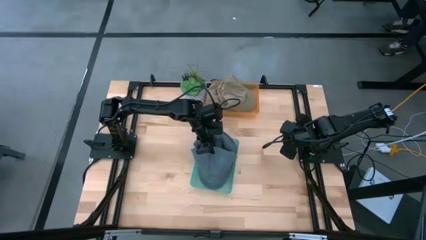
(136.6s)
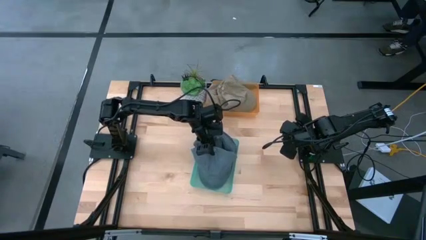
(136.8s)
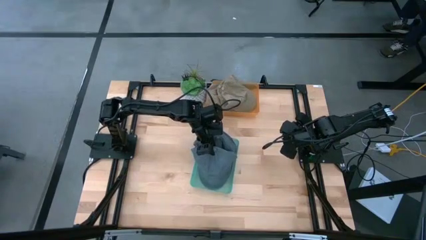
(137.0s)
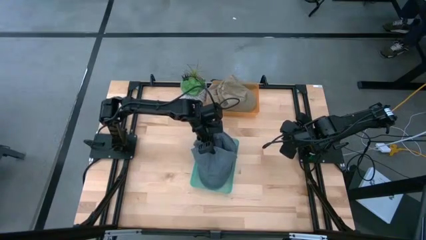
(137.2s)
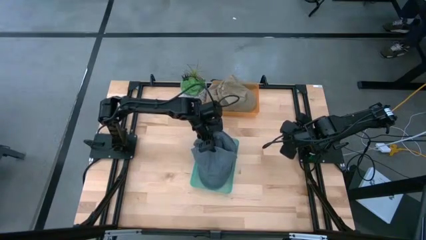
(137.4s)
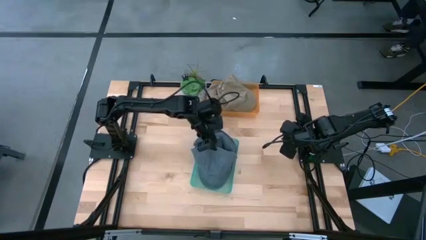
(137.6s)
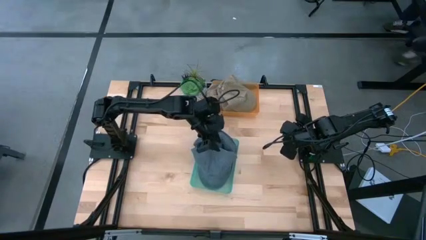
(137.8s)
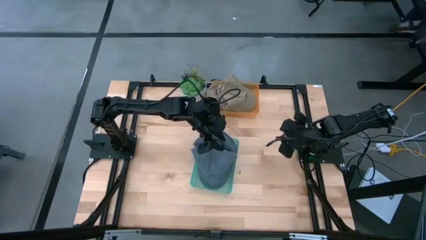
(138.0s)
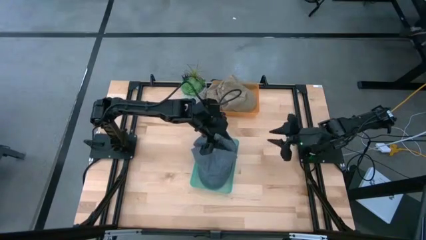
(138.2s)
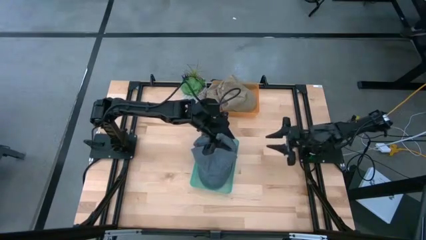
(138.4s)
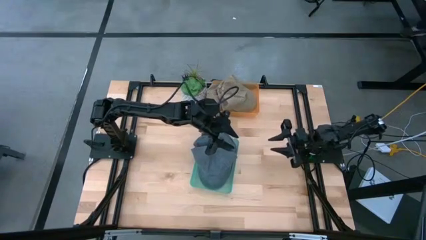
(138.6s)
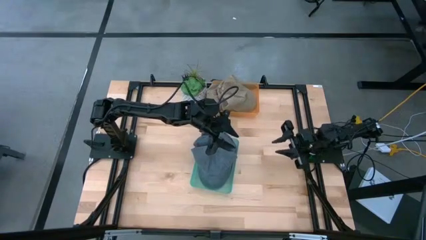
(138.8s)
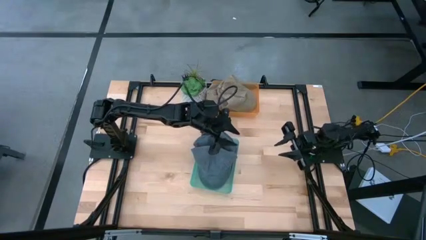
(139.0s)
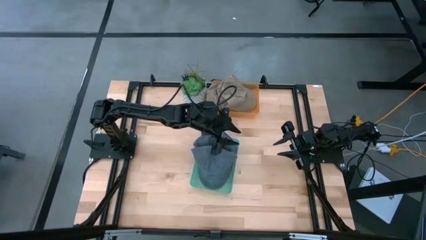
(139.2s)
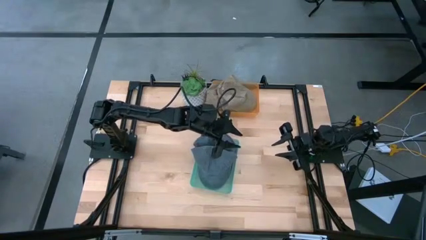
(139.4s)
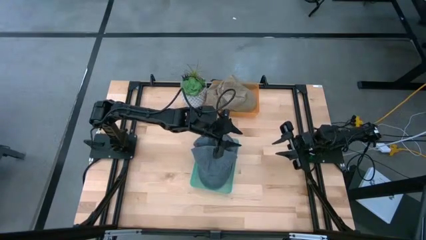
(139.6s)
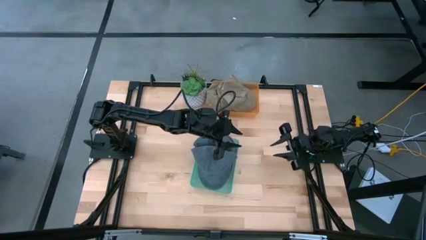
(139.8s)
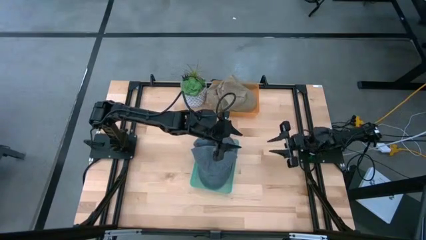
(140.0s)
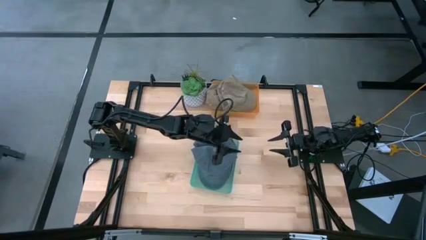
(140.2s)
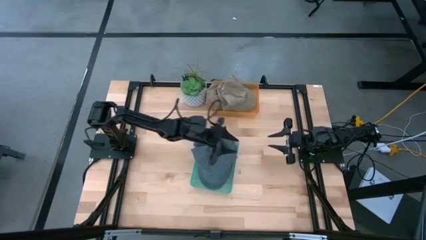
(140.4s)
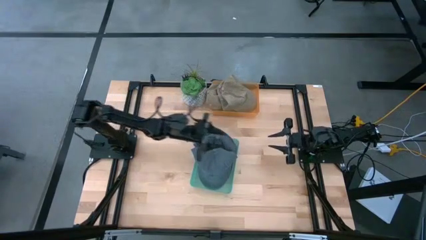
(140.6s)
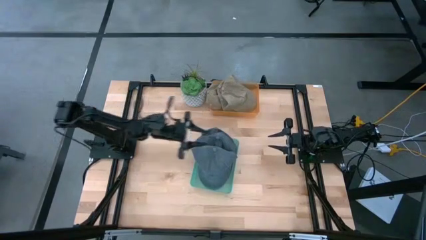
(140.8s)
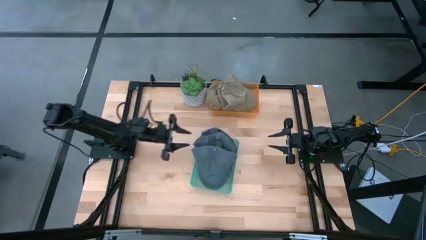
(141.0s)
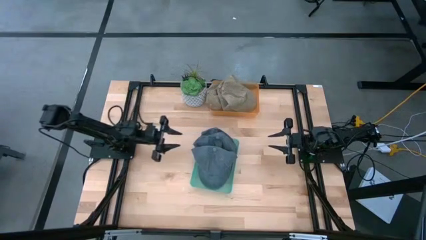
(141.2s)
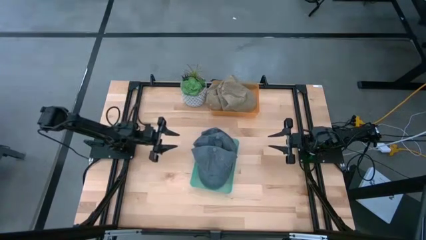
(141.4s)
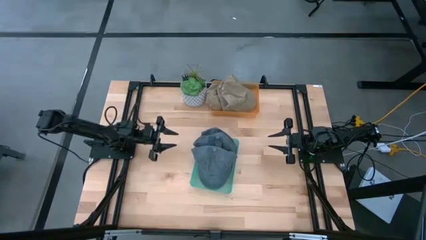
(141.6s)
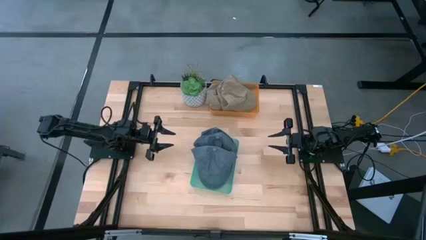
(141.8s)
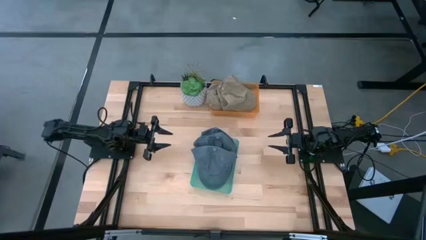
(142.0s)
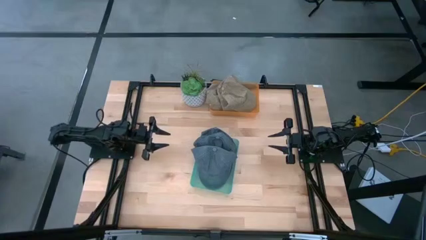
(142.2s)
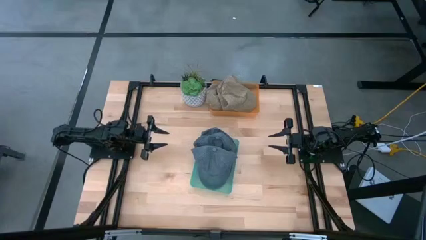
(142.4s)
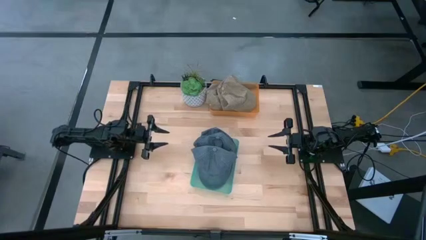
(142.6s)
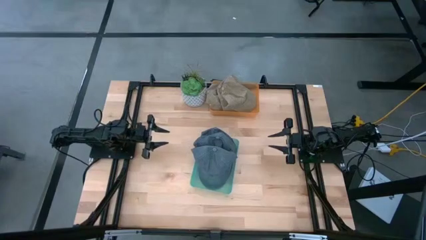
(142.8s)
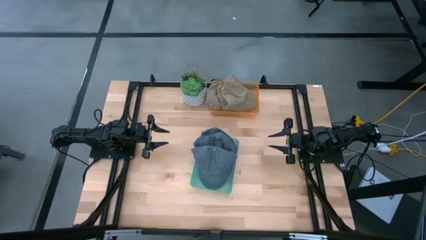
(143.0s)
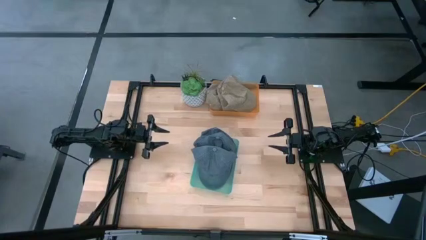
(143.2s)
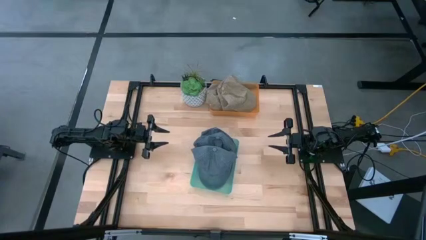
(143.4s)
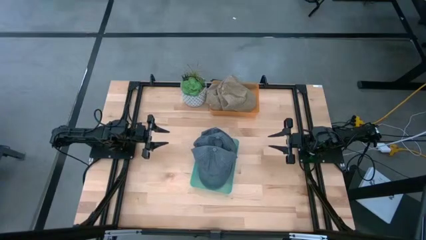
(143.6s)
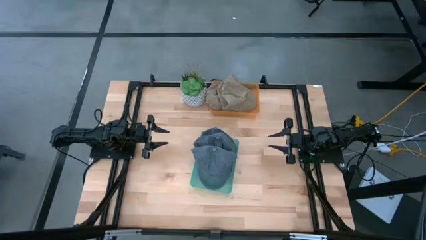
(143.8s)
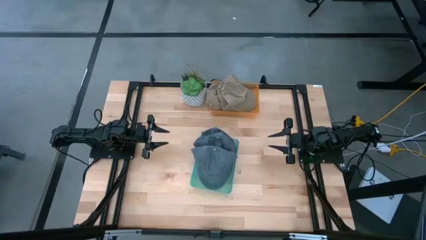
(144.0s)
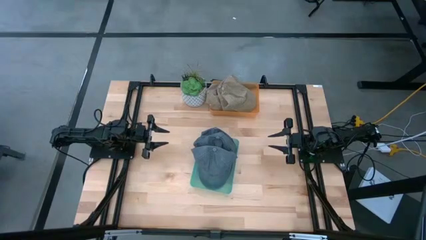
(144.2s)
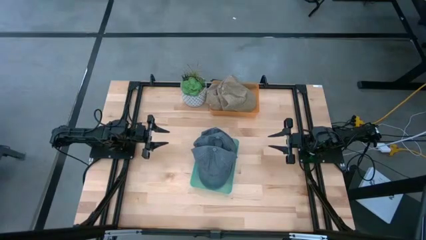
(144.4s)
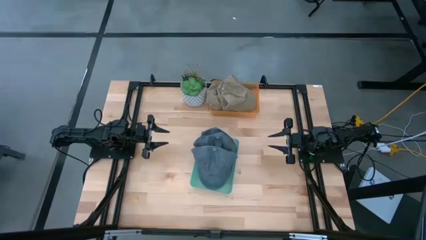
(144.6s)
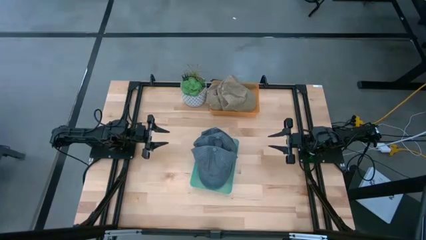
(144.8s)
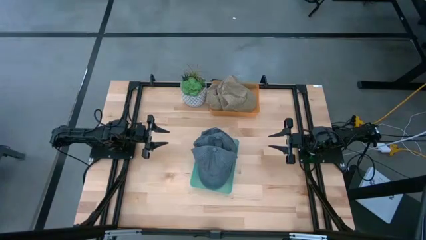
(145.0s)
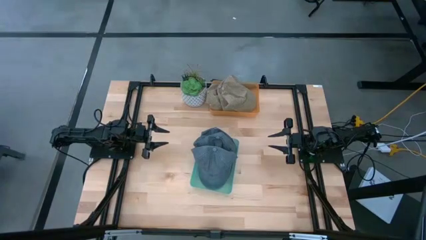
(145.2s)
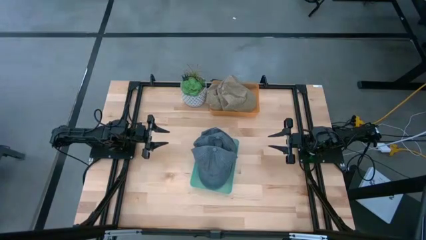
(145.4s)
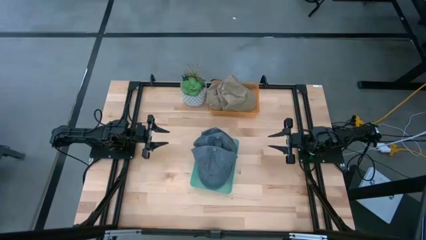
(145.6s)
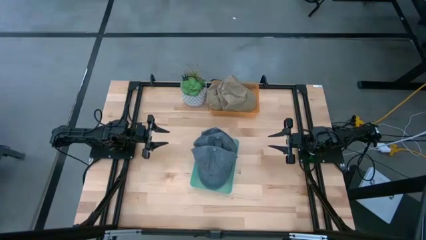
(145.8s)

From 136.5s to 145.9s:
Task: Pick & Place hat
Return to Home Position

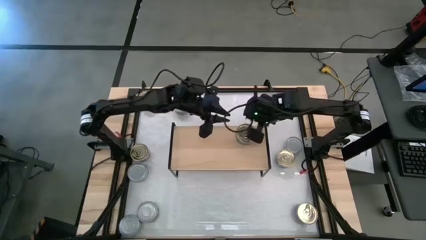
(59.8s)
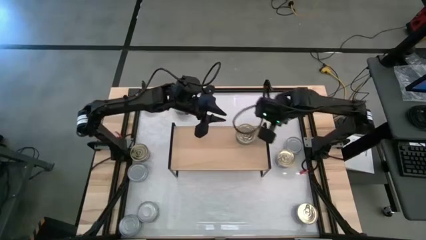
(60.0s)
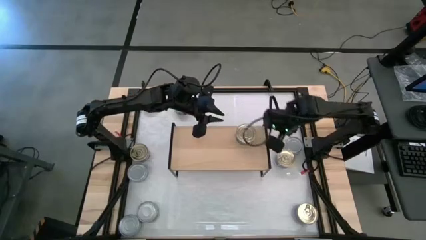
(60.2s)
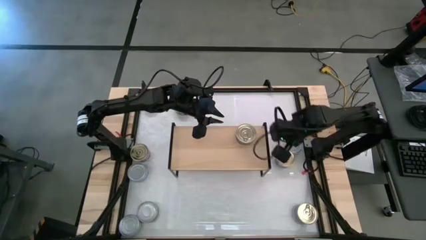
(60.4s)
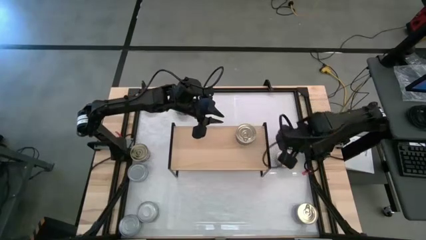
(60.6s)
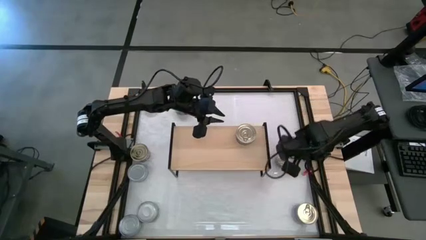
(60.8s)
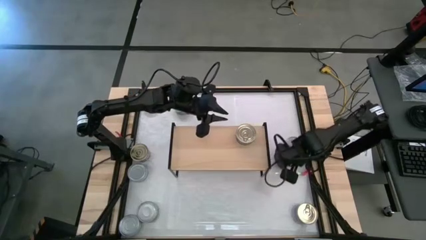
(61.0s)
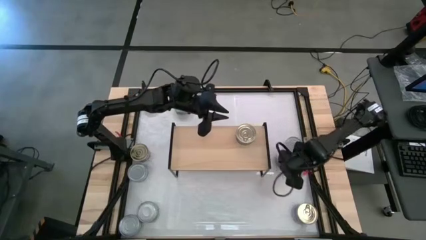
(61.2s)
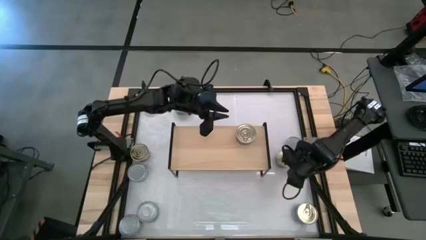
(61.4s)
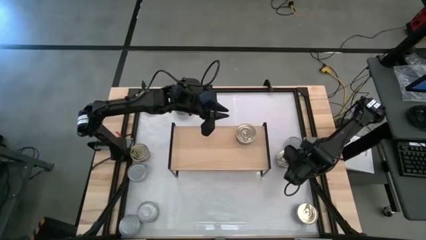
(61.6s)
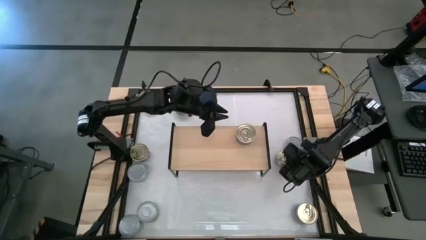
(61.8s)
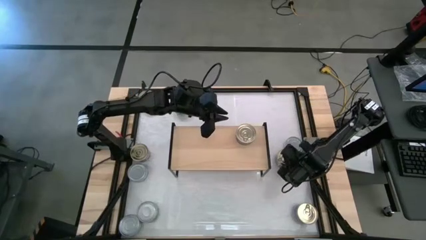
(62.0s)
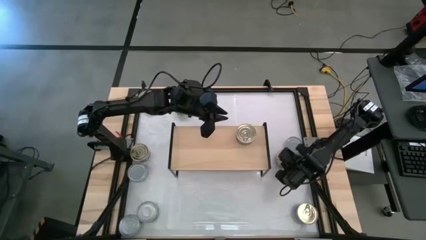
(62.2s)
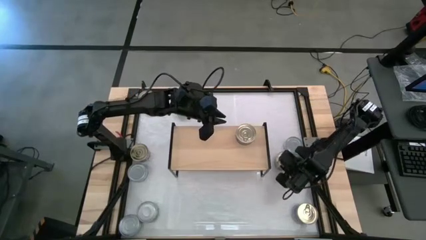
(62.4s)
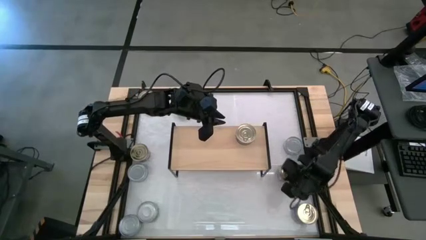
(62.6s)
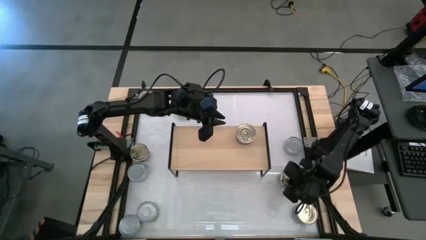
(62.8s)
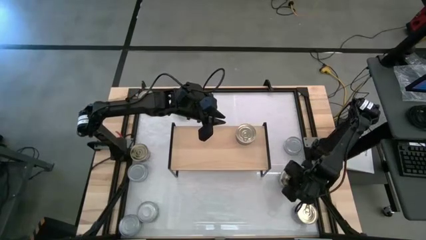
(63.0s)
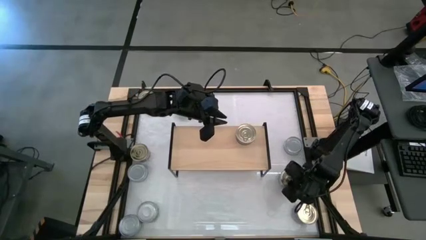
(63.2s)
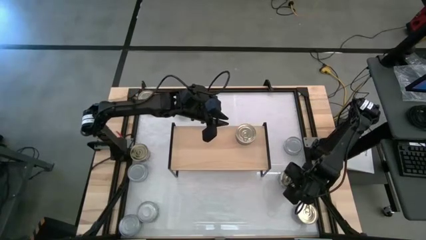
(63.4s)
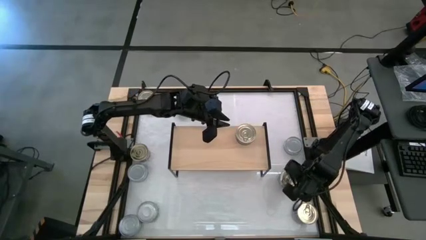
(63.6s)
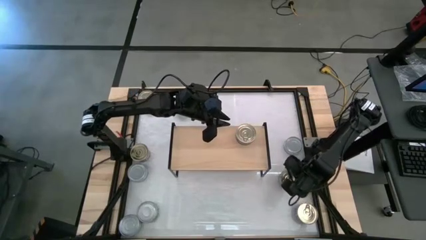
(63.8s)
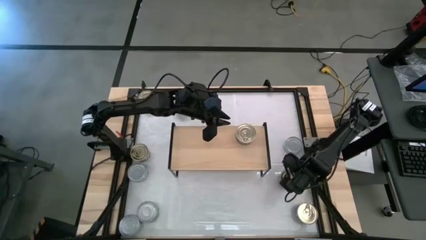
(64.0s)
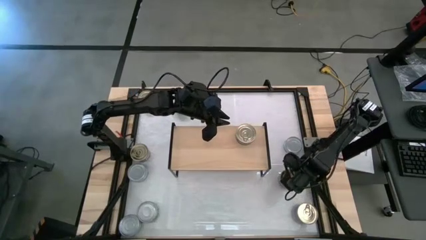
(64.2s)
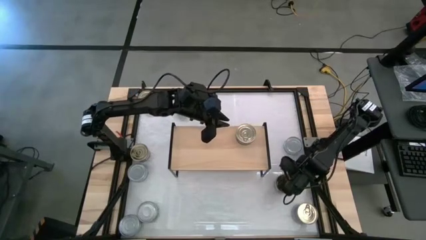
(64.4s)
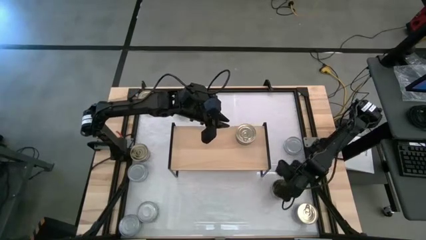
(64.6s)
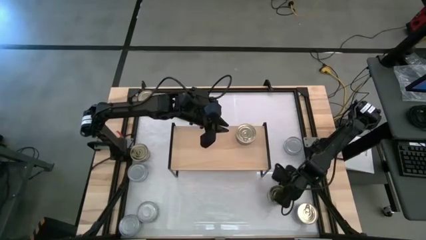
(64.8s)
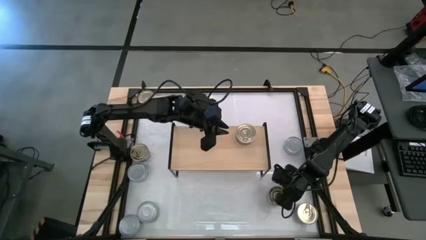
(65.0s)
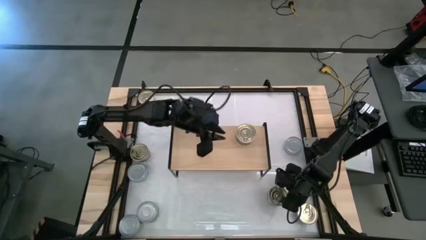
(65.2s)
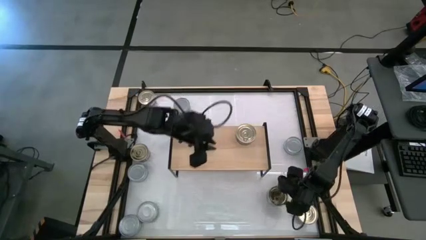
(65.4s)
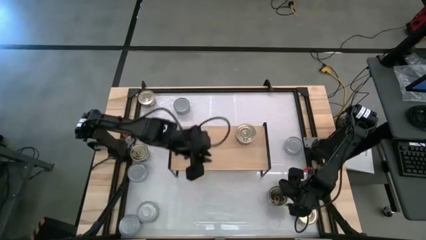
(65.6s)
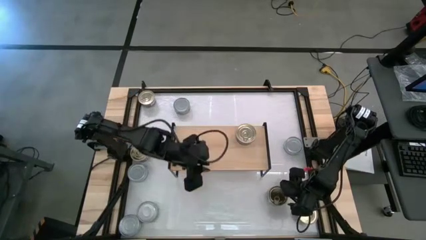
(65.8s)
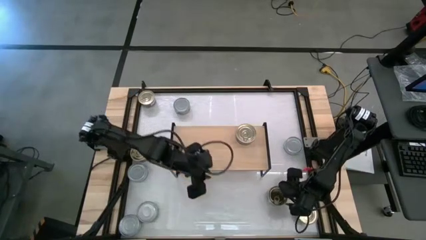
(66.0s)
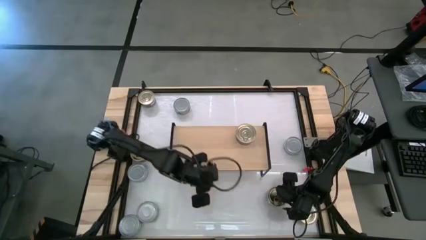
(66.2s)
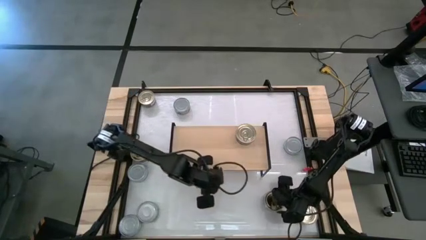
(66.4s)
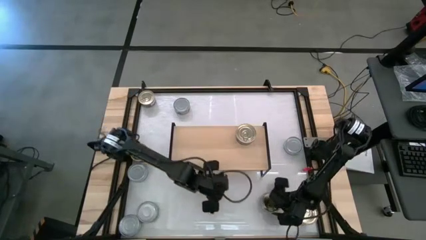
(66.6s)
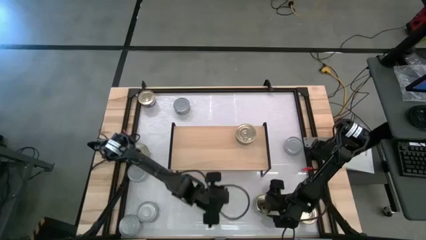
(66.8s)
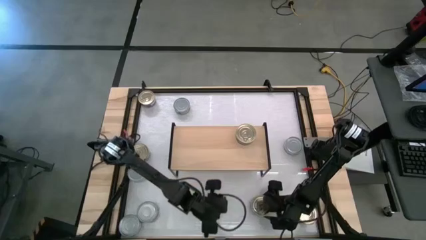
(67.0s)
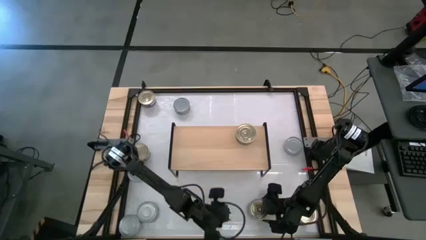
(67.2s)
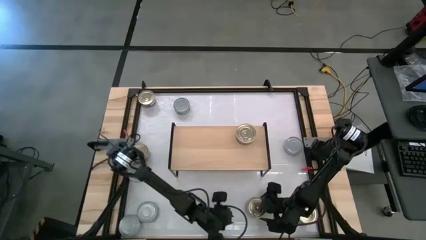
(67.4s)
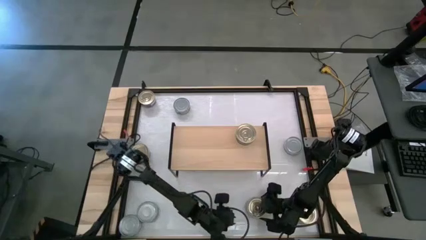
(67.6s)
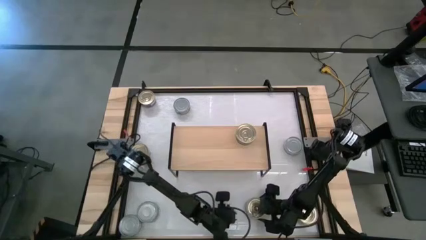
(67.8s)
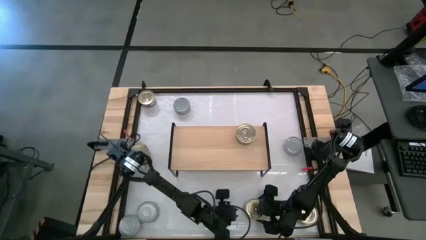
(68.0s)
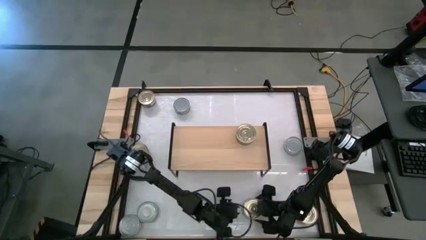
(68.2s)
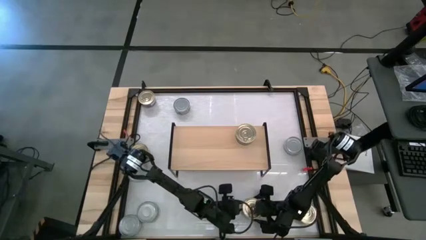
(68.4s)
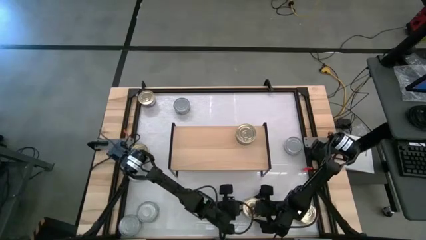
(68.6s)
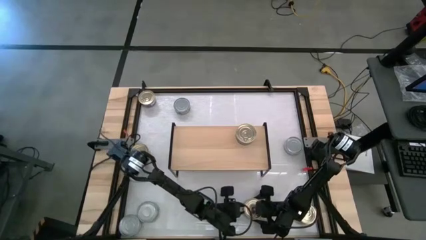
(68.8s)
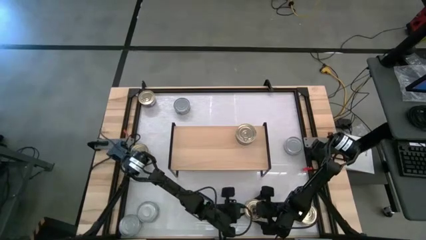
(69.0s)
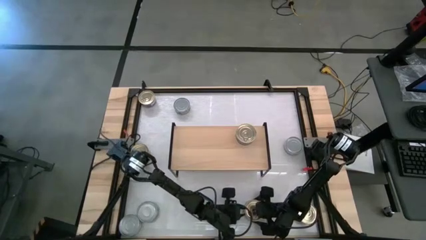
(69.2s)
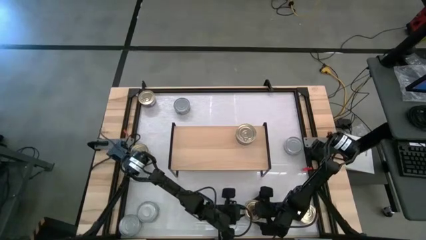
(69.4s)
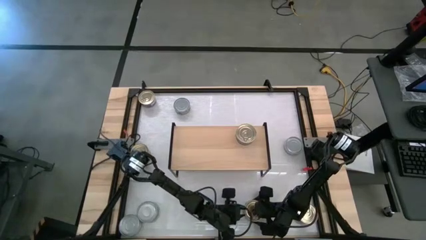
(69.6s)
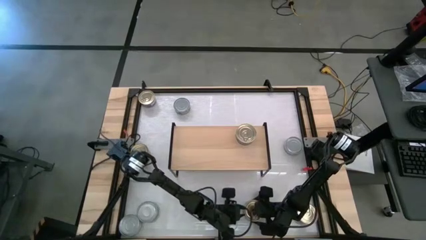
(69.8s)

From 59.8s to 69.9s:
Task: Stack canned seafood by type on shelf
Put the blue-pink tuna can on the shelf
